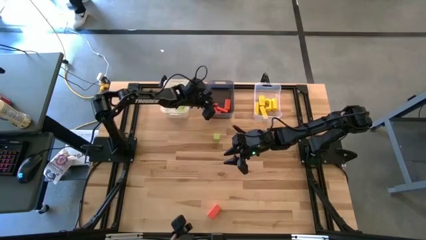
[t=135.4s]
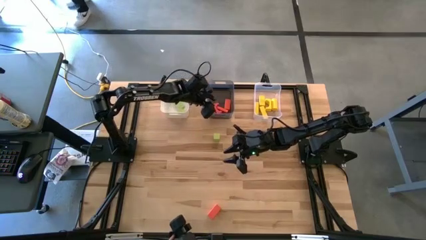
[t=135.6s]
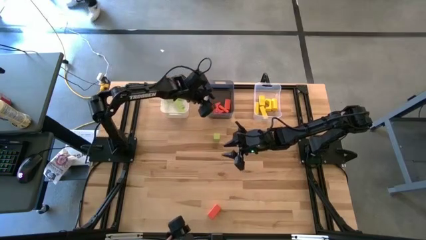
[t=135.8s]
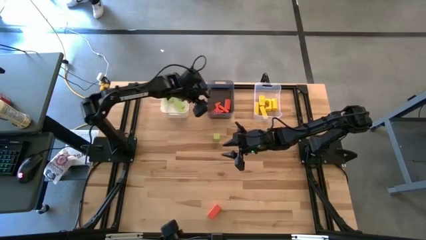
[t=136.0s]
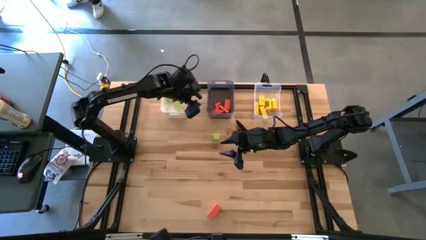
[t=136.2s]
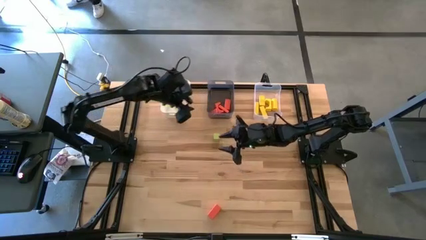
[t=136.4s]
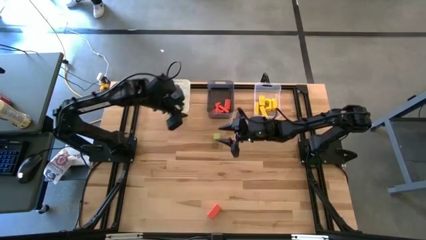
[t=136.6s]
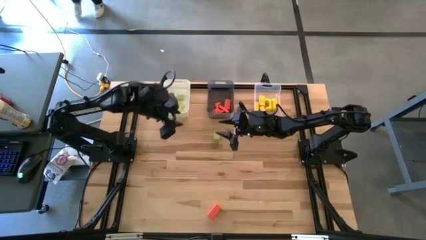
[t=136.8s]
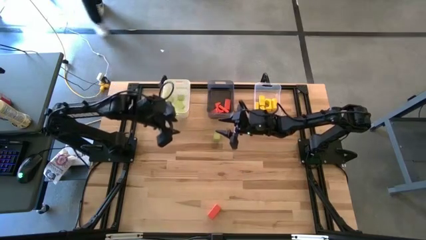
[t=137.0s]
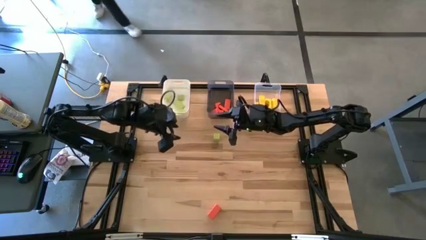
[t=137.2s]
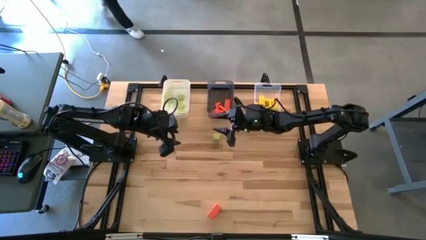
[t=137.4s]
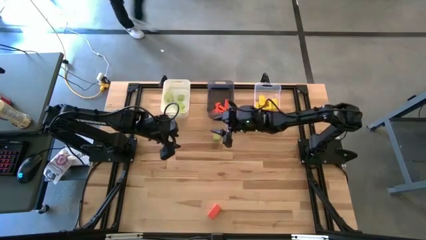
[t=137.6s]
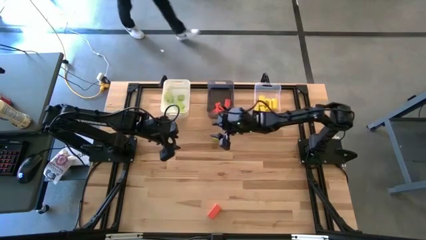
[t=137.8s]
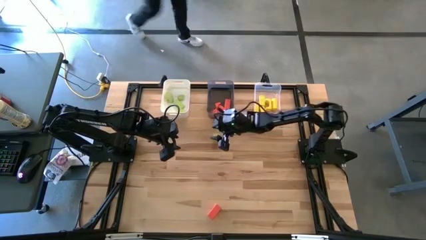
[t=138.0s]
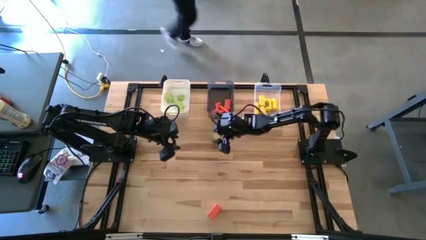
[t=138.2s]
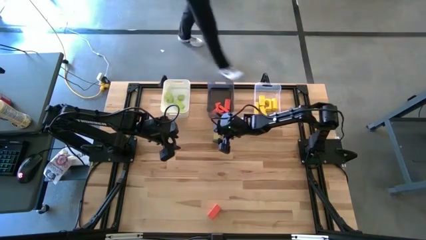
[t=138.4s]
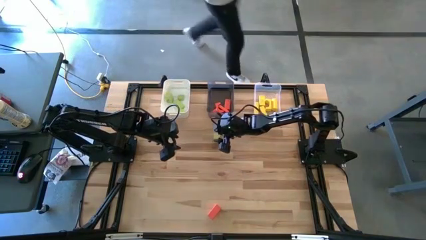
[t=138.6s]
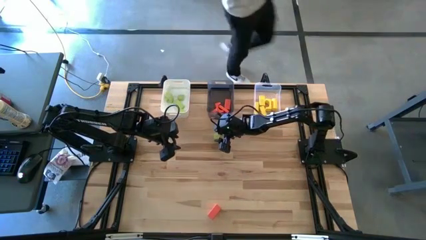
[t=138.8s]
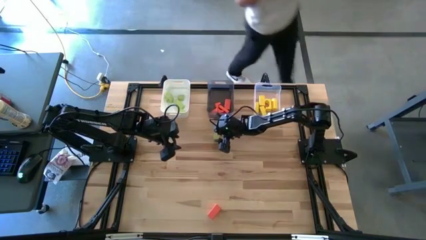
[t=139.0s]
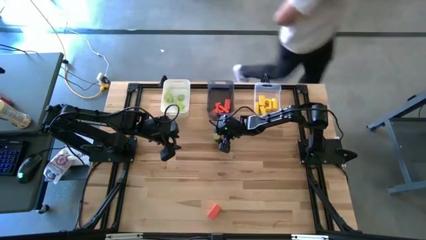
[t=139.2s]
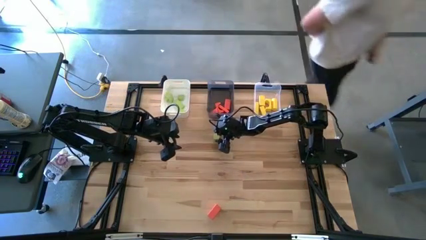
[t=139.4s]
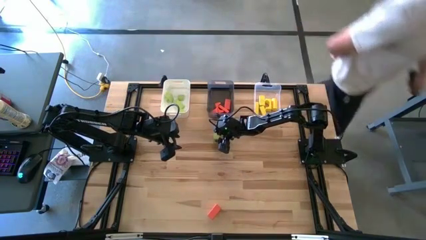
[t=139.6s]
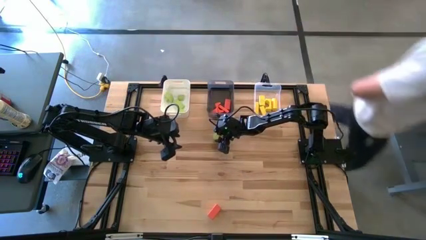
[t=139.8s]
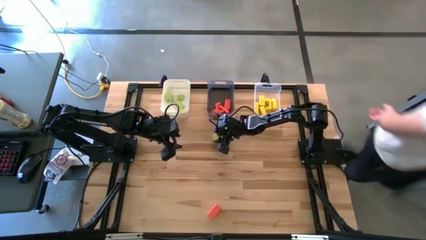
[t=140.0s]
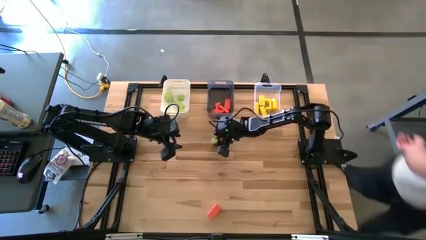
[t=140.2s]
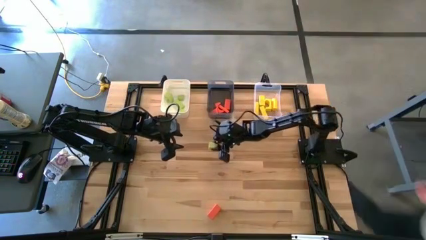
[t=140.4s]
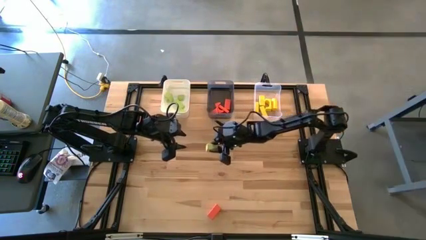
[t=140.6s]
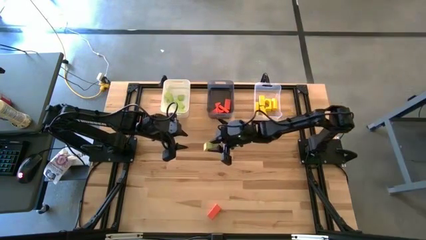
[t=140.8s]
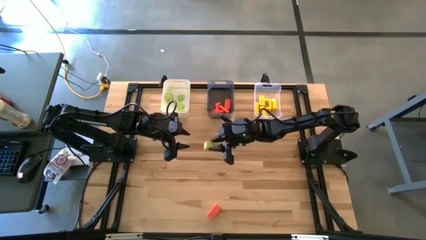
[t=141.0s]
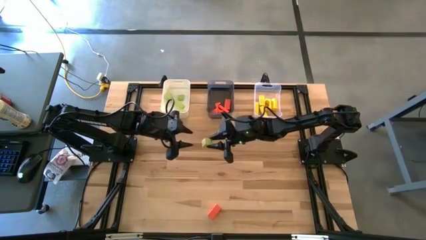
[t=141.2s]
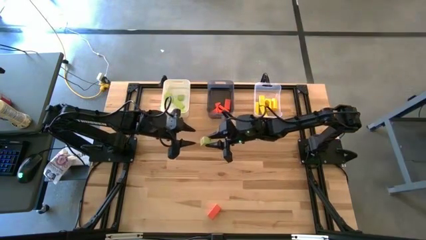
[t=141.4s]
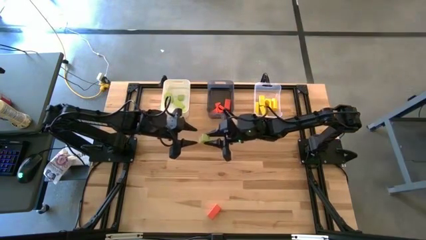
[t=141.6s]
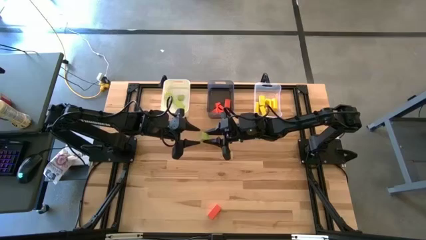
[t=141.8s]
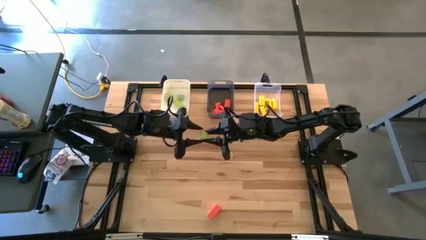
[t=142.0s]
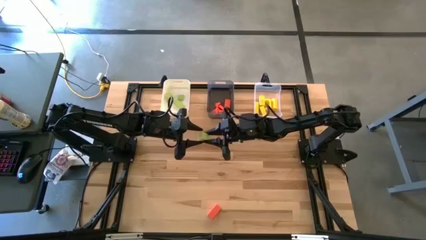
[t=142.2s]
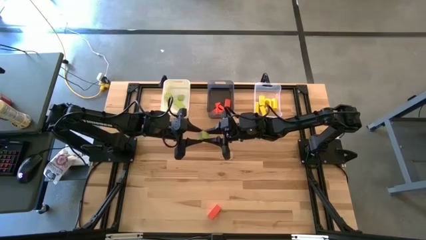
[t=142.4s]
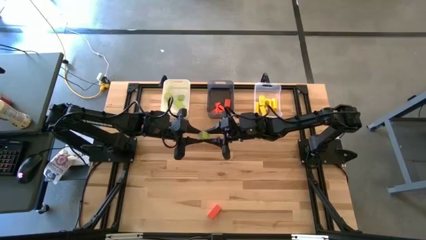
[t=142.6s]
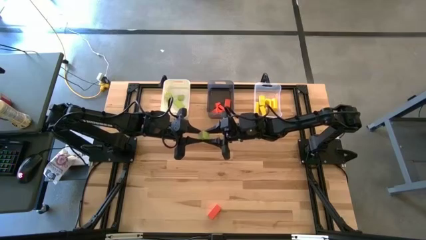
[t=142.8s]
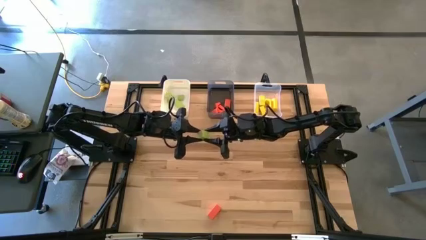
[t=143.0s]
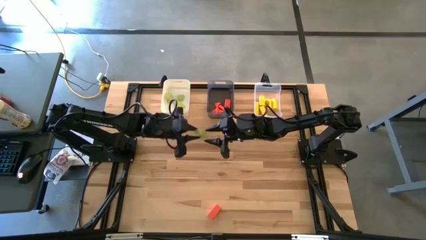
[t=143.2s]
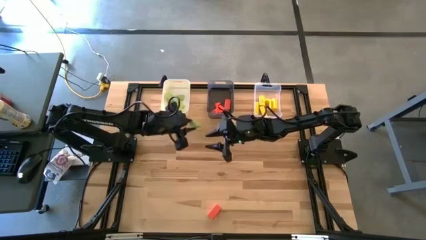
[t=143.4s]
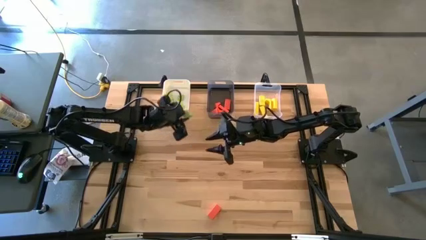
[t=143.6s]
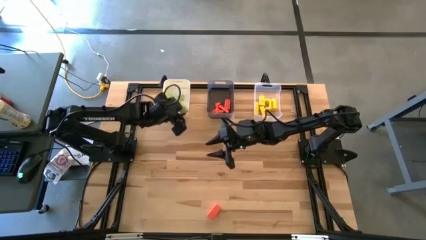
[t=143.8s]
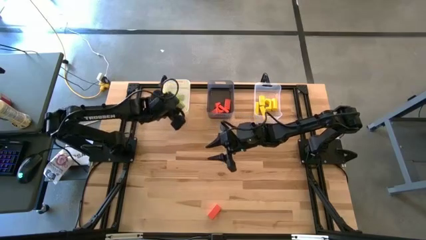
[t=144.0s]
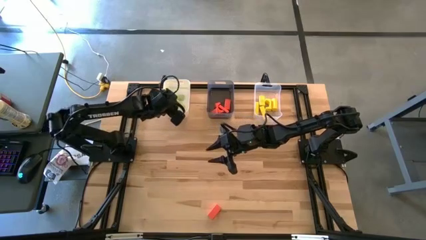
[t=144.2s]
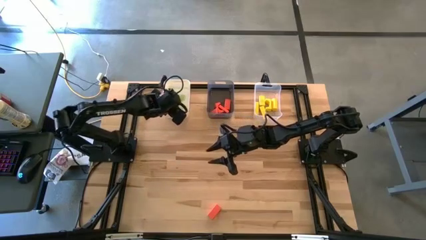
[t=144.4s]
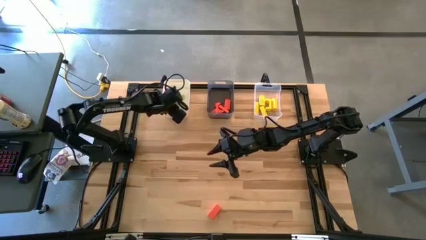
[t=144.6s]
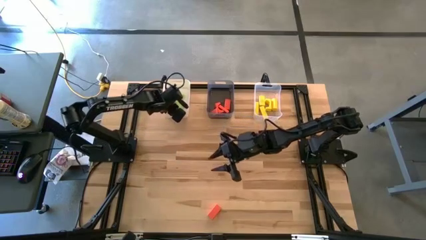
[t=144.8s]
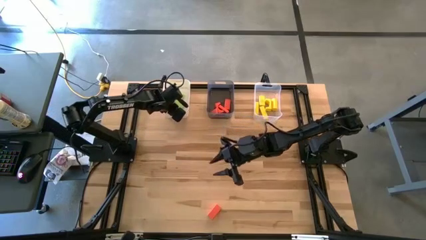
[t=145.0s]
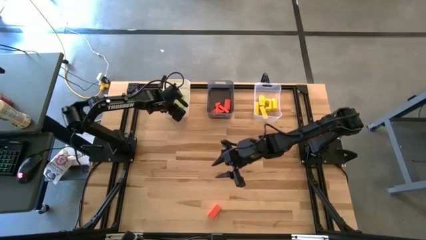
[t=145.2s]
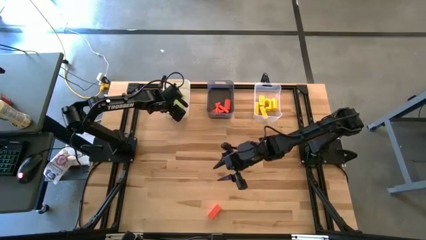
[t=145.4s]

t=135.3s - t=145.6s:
Task: Sort & place blocks by color
Put the green block into the white bin

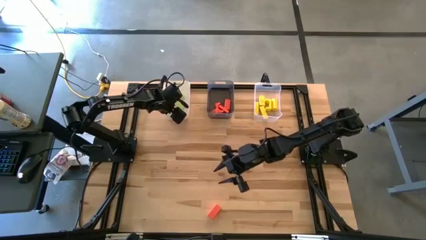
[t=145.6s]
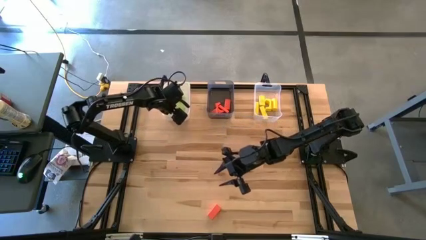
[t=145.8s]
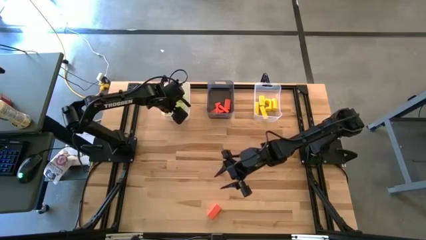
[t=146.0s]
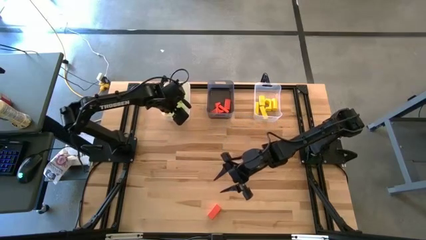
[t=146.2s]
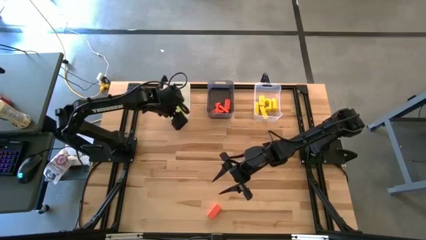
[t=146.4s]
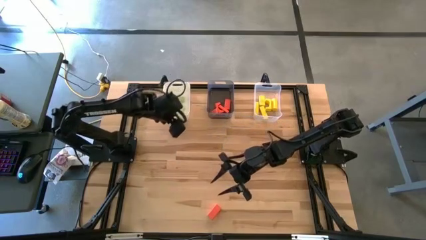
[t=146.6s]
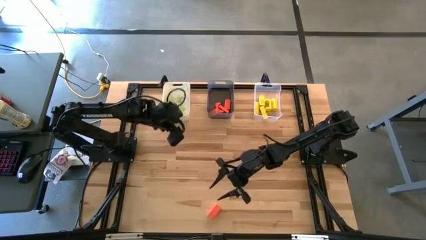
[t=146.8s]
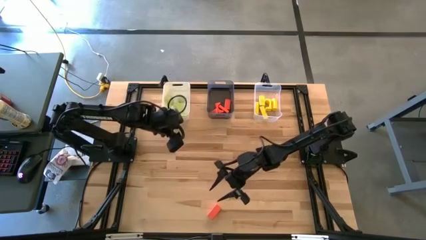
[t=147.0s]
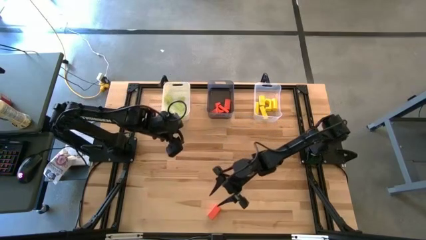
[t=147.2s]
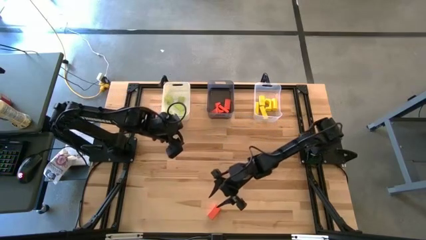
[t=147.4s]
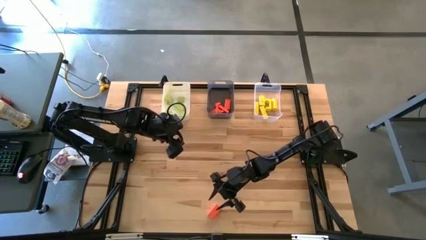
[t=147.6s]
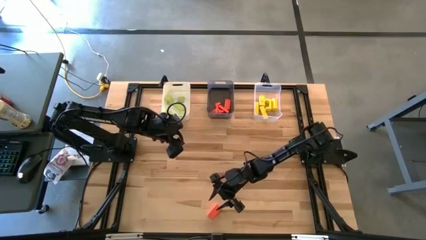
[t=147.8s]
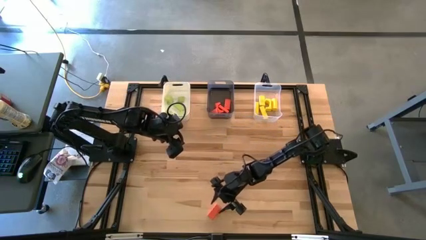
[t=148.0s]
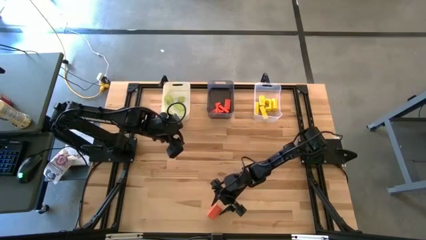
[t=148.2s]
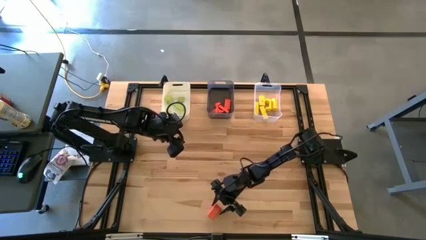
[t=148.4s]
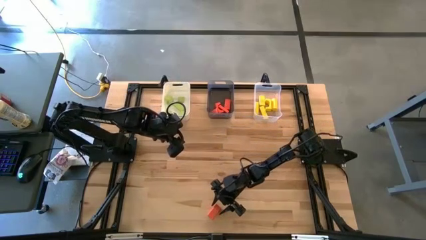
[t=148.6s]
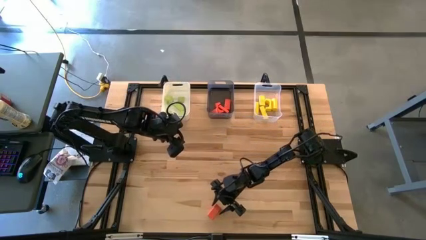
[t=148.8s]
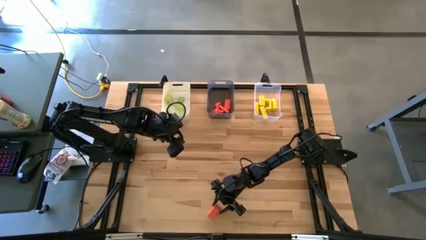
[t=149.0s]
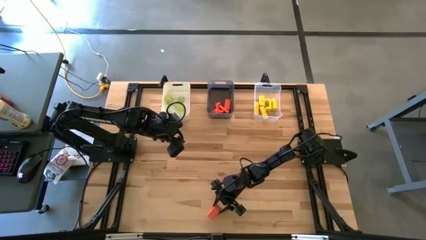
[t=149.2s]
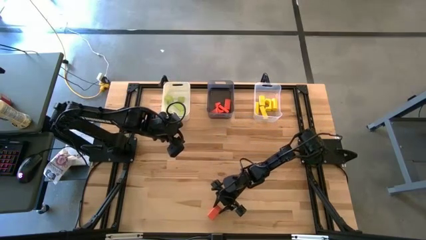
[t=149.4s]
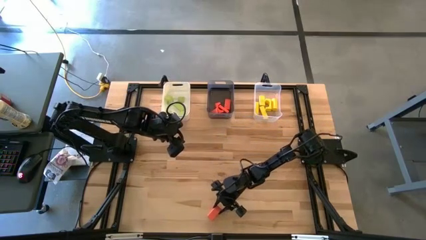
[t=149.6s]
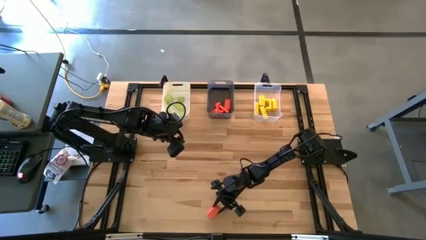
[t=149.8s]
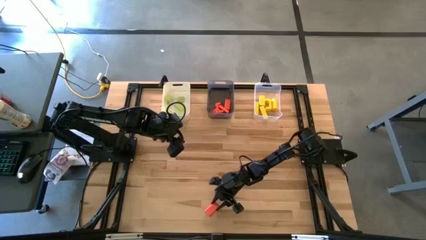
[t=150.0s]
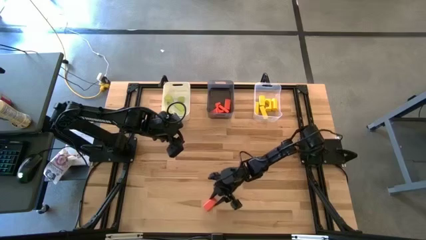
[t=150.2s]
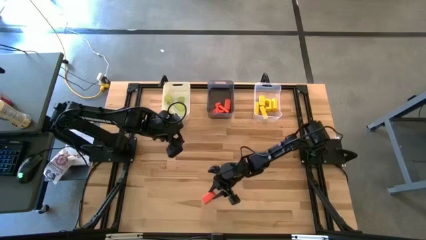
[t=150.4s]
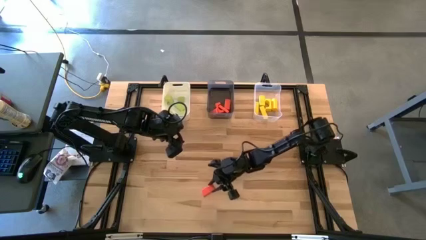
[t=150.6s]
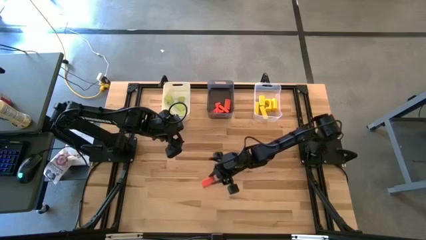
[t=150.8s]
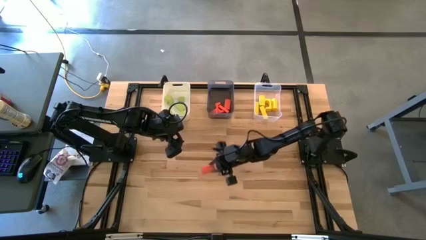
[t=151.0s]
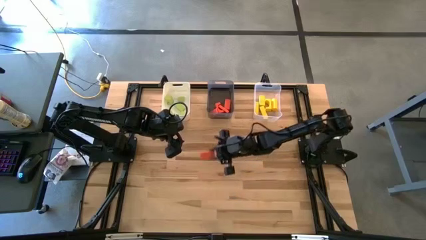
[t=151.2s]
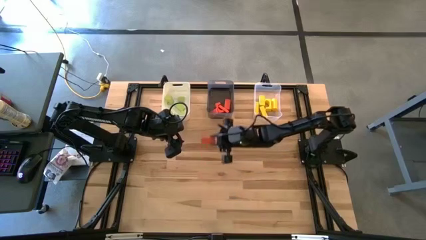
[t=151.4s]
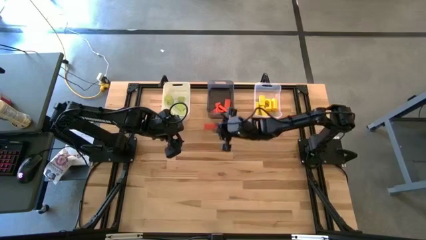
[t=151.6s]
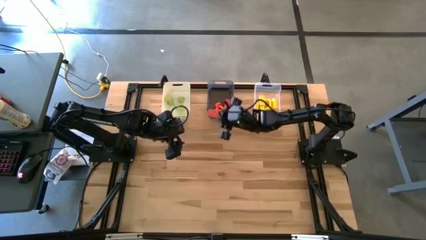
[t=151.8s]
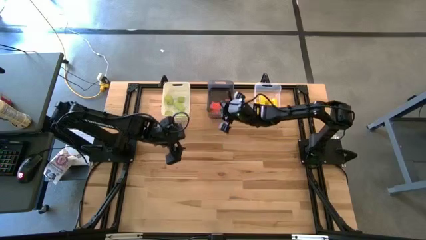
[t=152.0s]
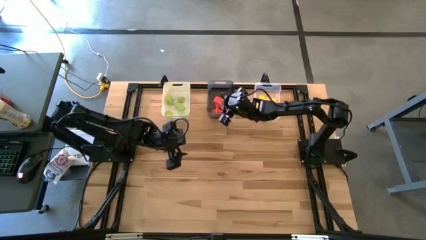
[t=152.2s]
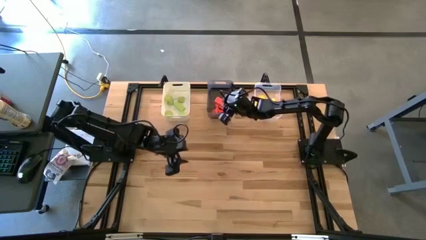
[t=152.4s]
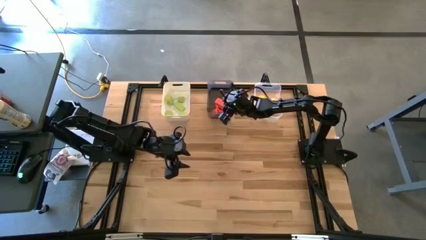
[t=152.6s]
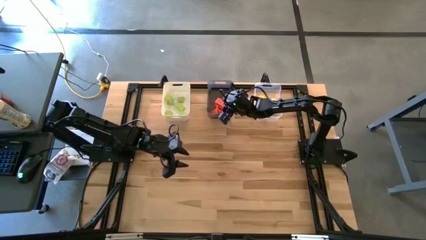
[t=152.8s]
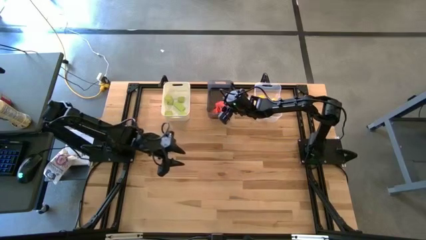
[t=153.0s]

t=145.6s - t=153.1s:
Put the orange block into the black bin
